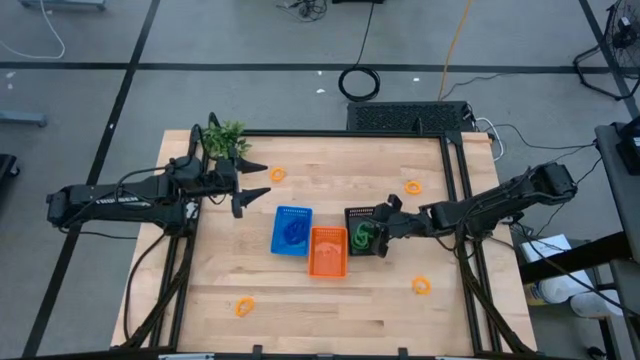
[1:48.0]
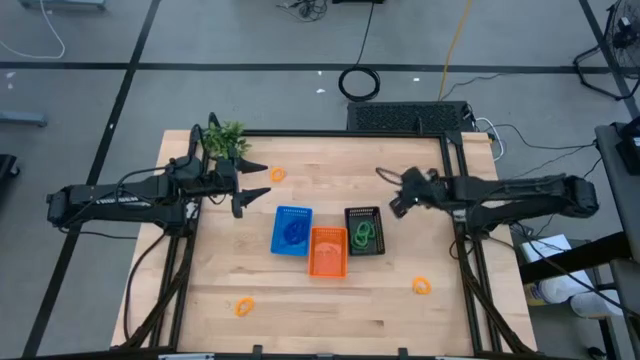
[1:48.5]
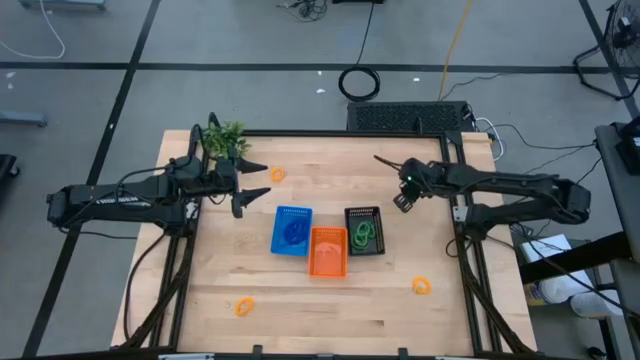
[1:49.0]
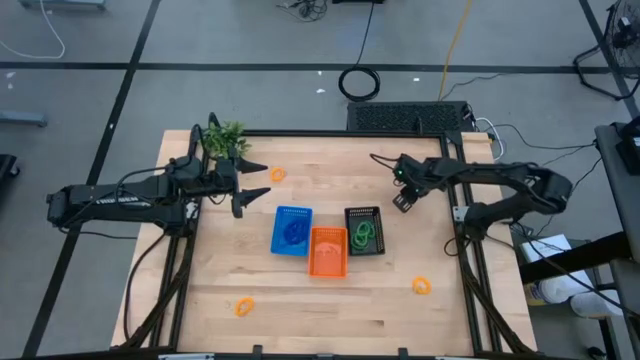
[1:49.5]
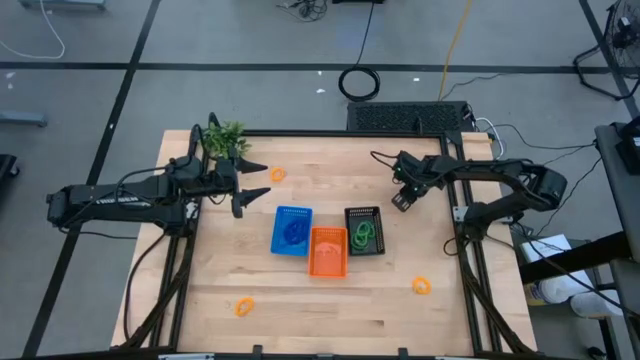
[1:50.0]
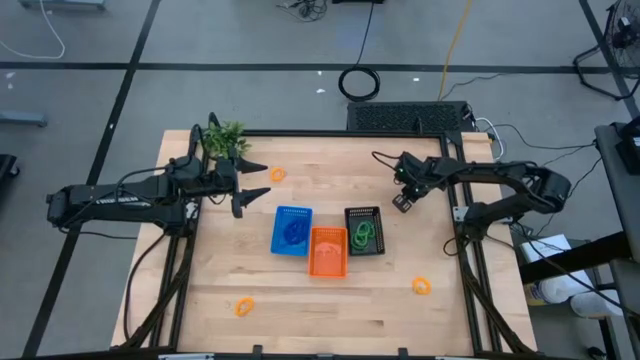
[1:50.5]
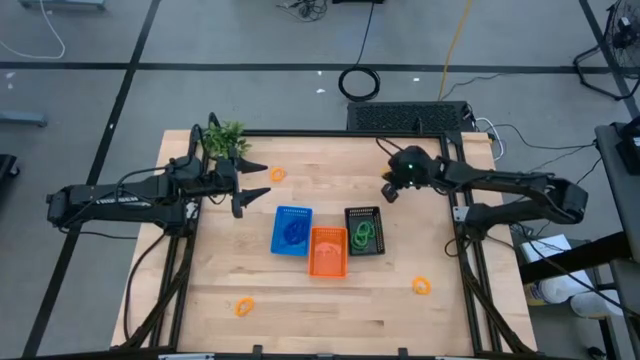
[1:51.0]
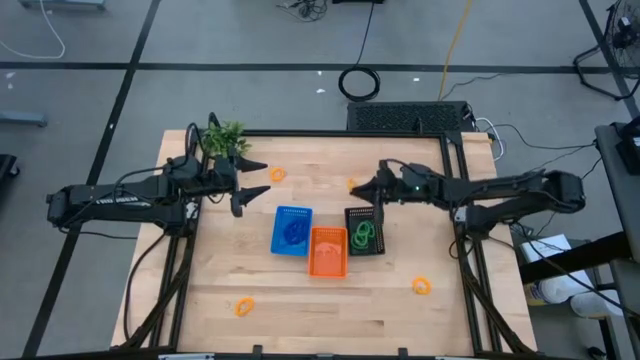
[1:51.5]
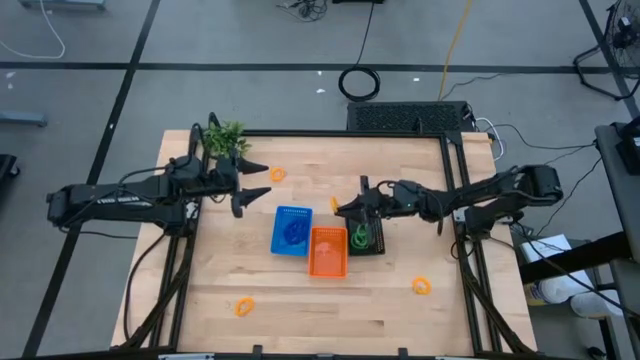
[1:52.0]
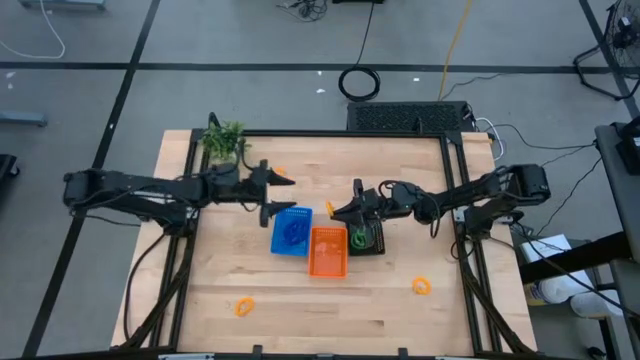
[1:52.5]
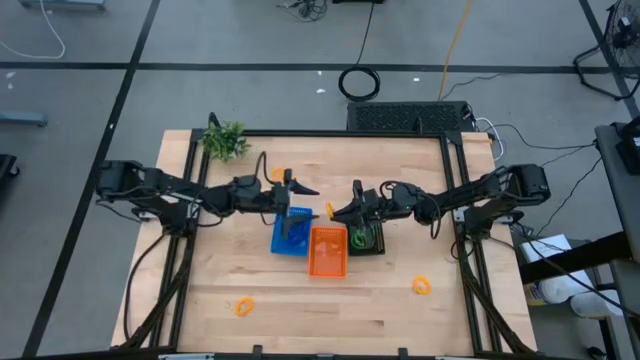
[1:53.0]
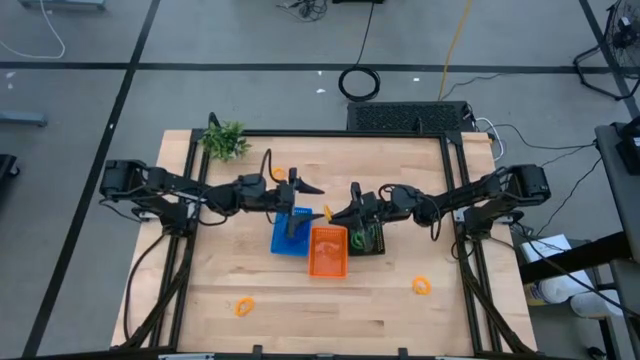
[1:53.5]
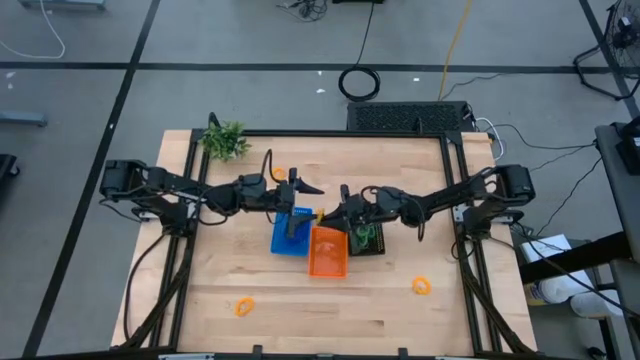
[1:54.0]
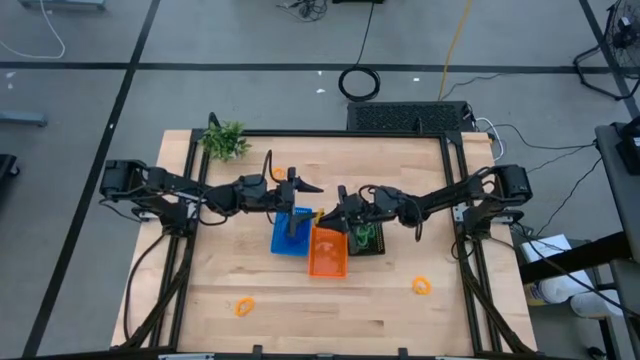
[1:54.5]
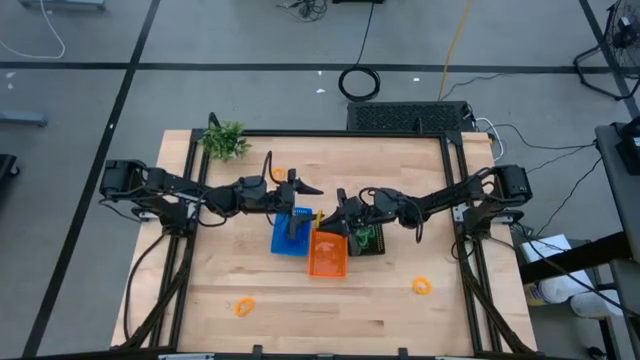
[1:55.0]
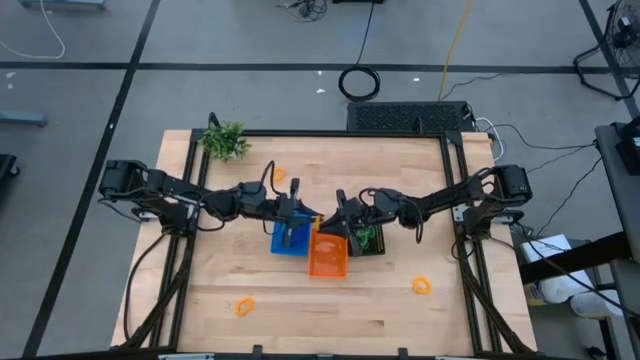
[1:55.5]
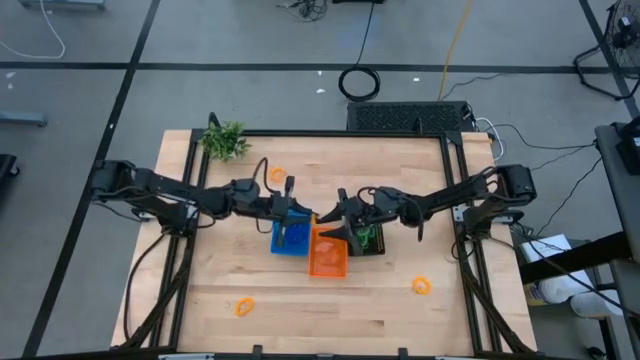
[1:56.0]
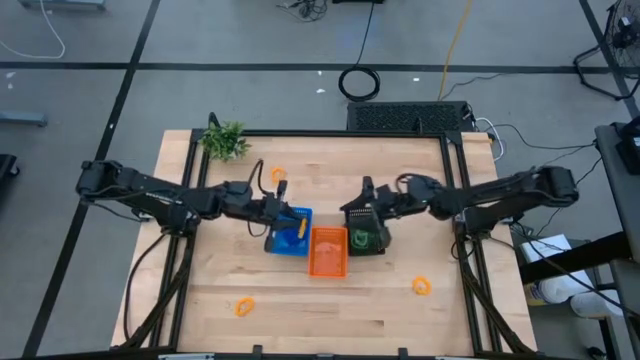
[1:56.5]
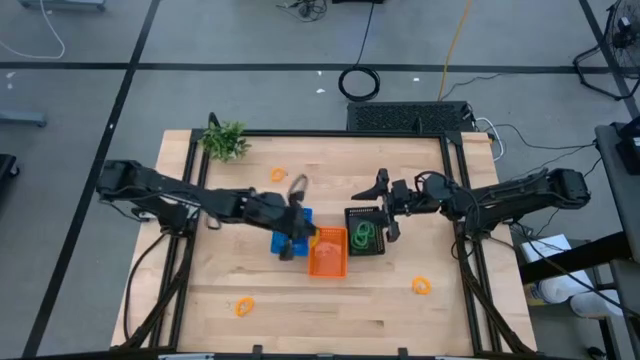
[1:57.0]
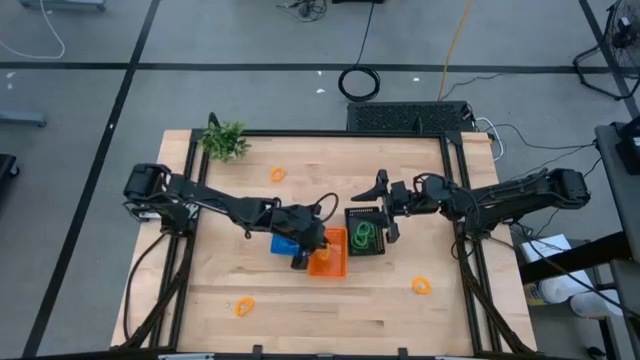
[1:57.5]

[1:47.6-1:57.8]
Task: Sort spring keychains
Put the yellow spring keychain into the orange bin

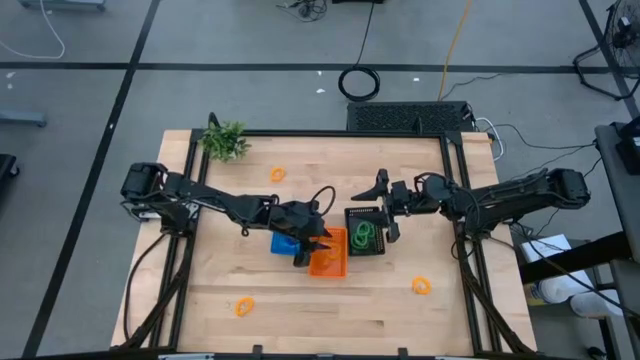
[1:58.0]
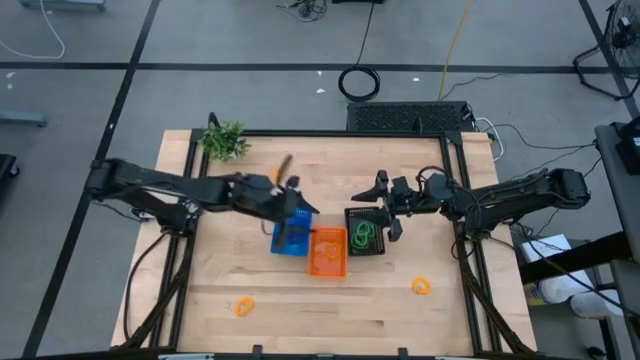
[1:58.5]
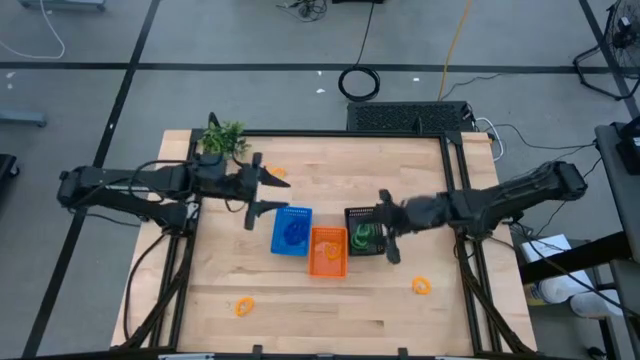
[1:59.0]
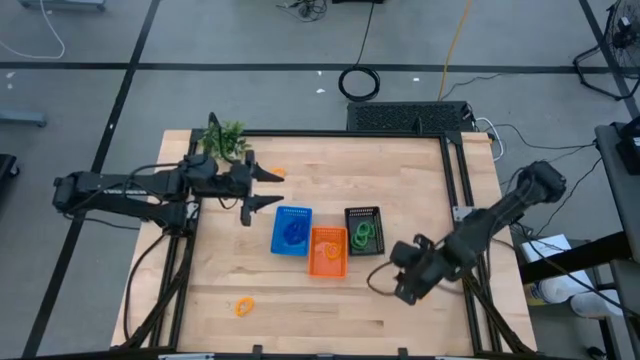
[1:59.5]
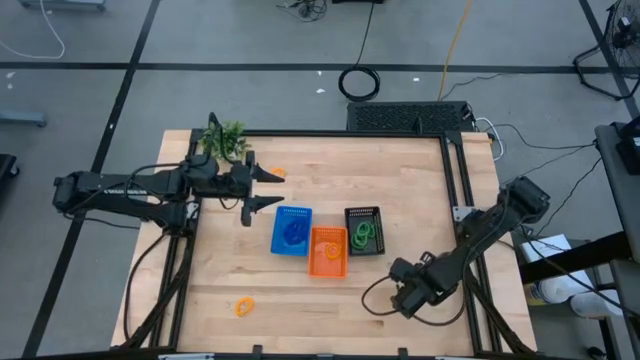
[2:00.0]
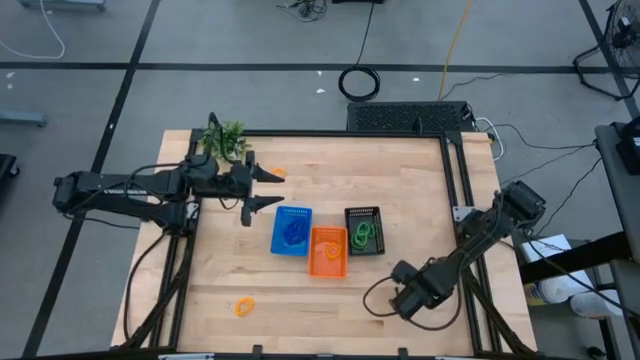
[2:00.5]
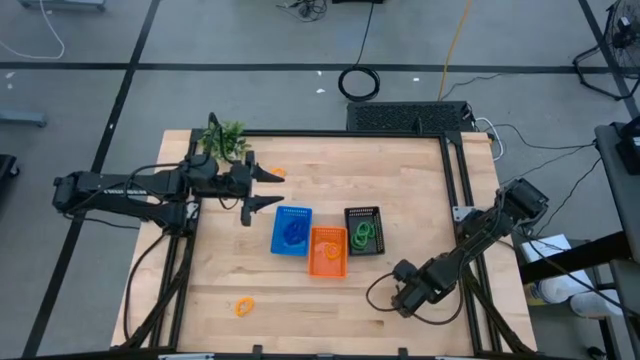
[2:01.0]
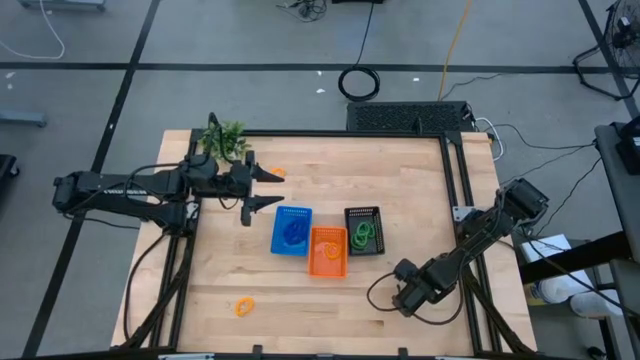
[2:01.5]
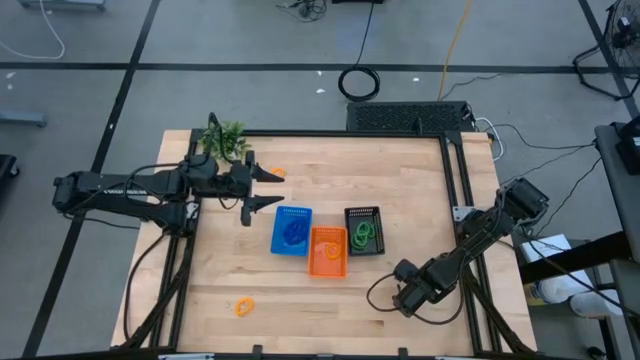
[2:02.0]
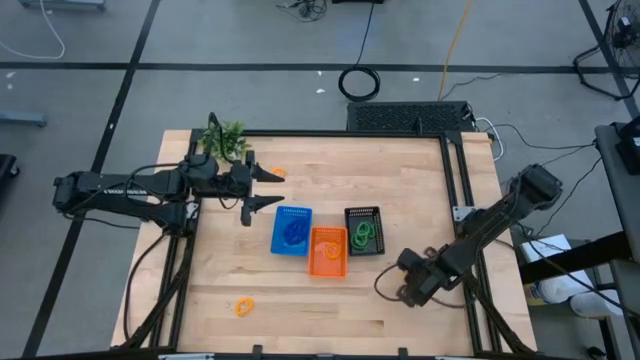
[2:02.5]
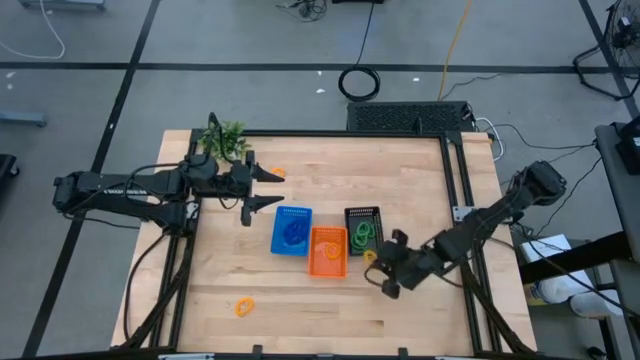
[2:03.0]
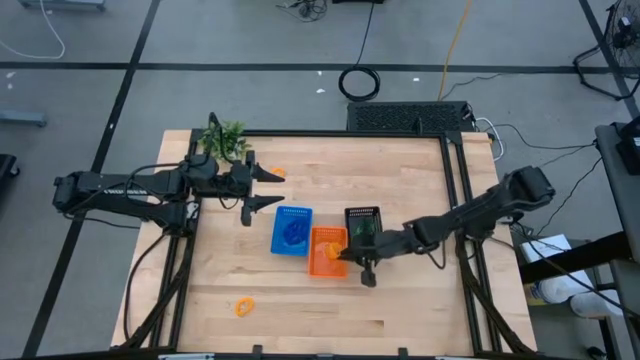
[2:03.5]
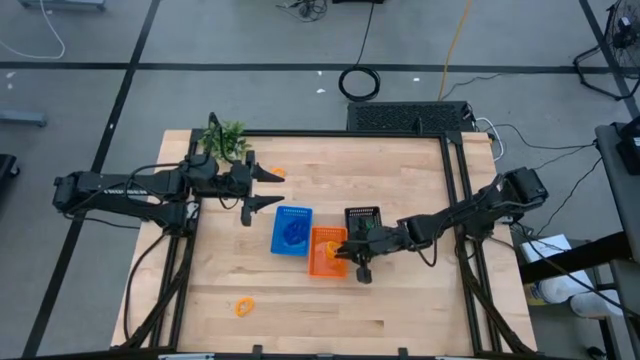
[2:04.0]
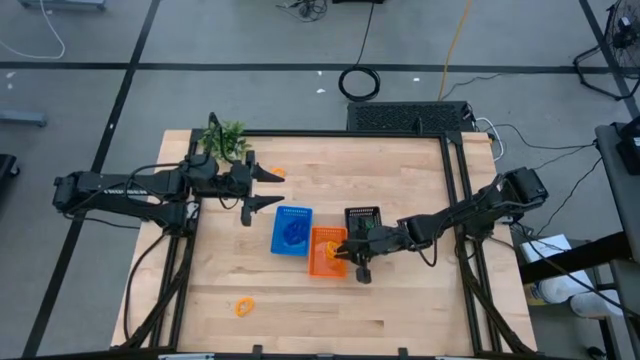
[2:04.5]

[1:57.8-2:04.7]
Put the yellow spring keychain into the orange bin

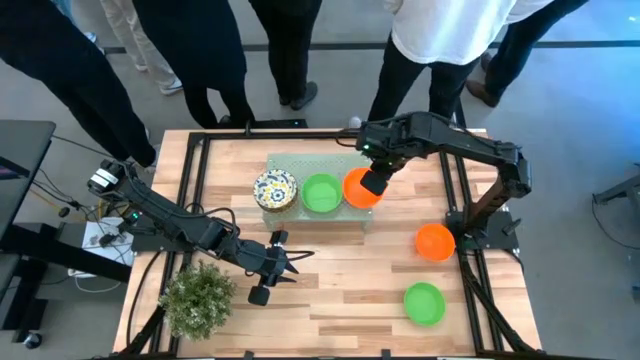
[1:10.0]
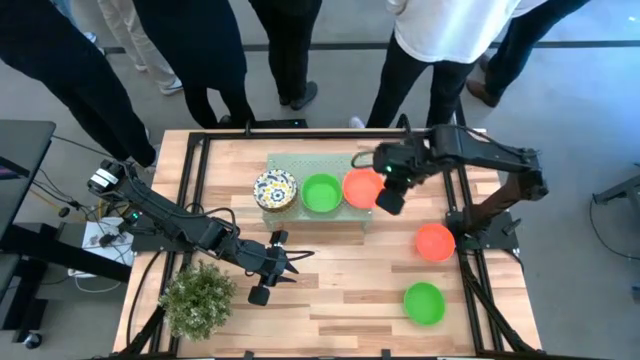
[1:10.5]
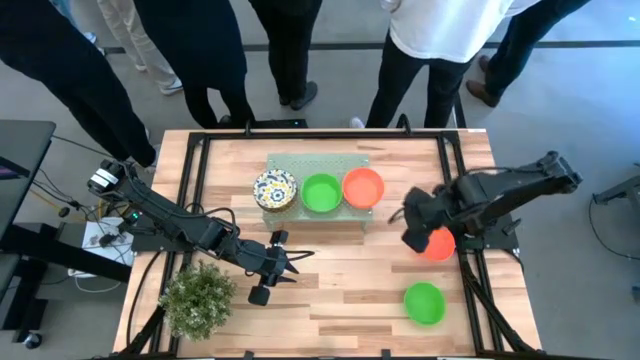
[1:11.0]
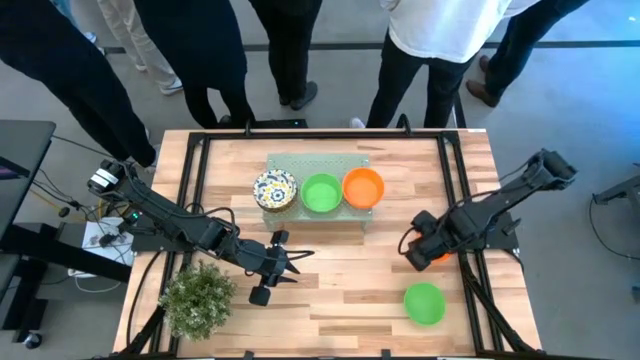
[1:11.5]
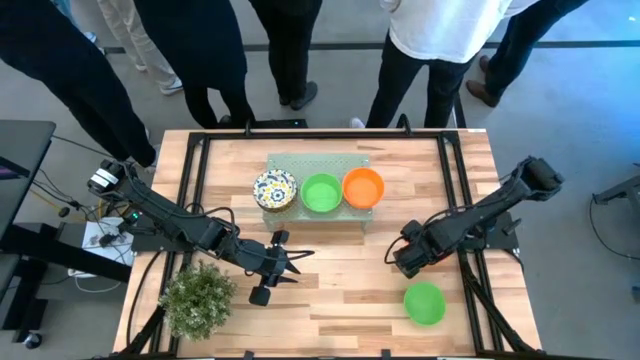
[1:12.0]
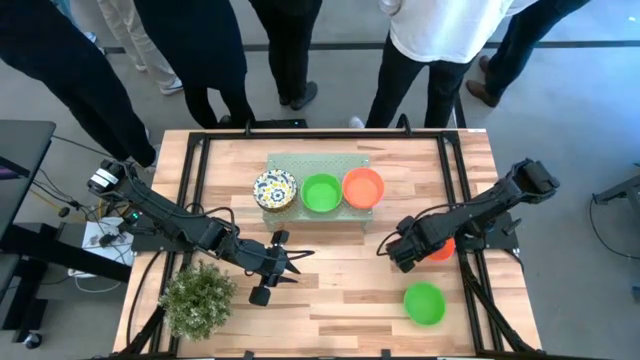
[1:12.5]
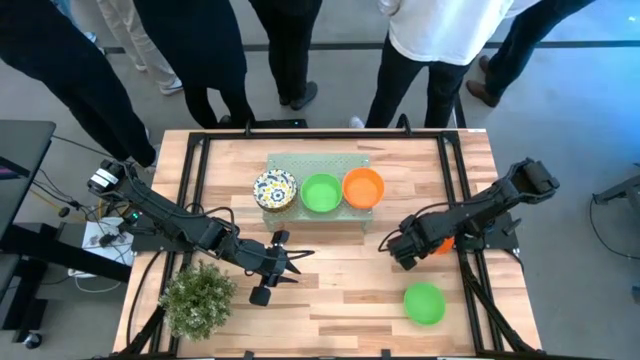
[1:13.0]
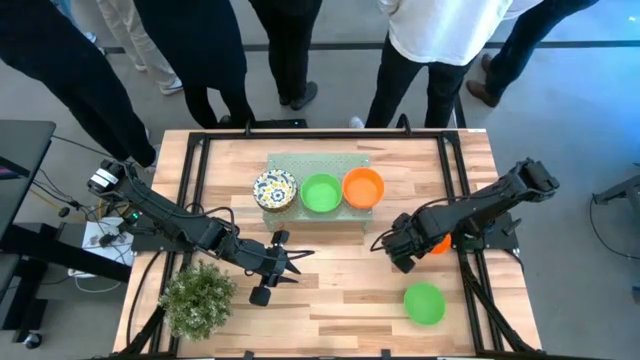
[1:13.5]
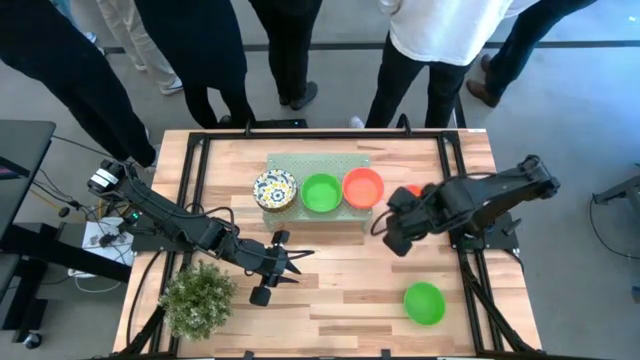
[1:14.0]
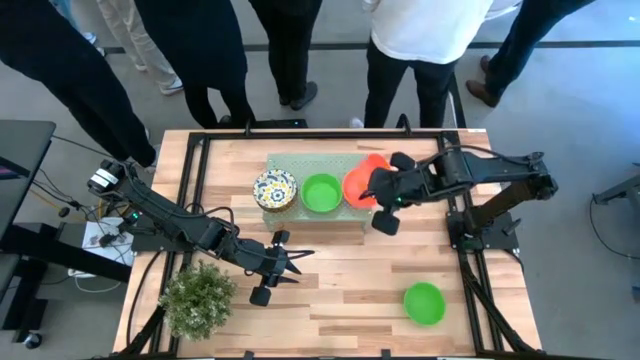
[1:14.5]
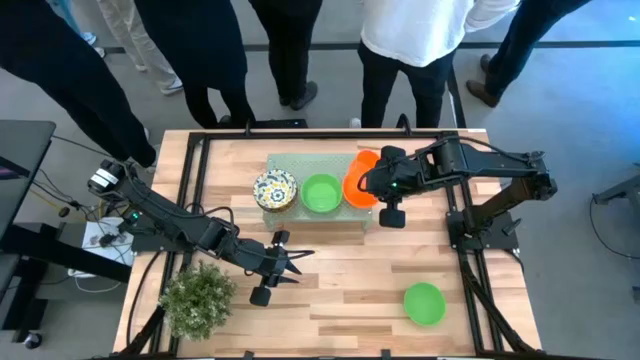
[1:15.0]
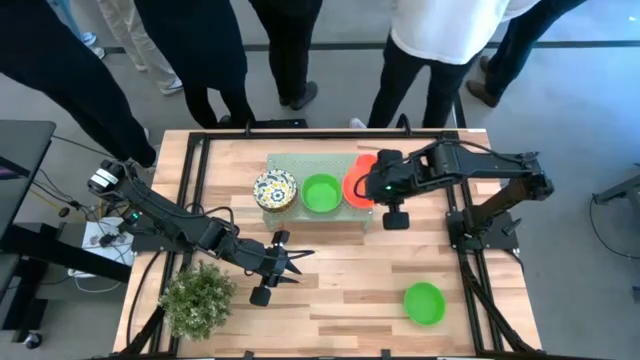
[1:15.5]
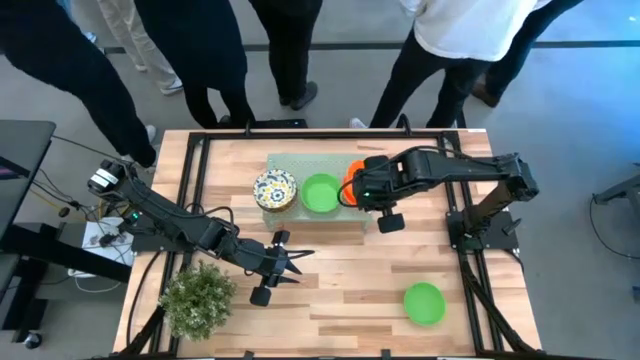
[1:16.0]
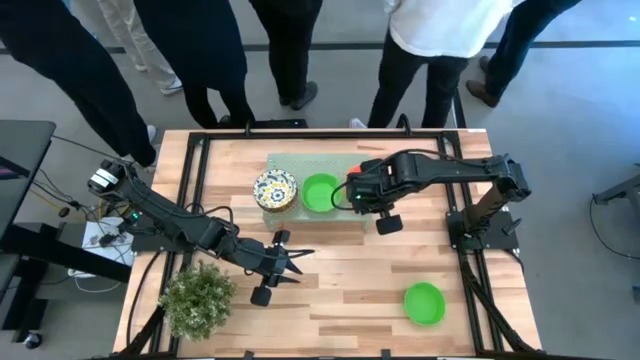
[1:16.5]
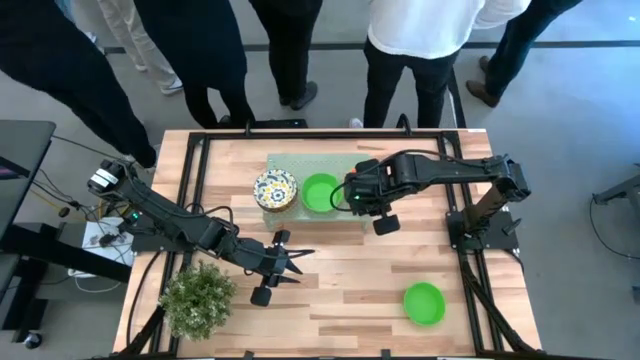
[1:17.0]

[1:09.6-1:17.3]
Task: Pick & Place Mini bowls
Stack the orange bowl on top of the orange bowl on the shelf
